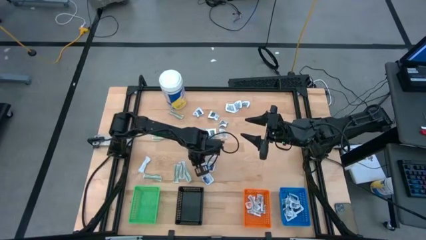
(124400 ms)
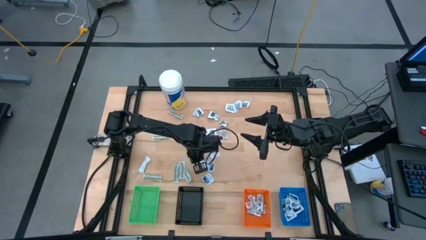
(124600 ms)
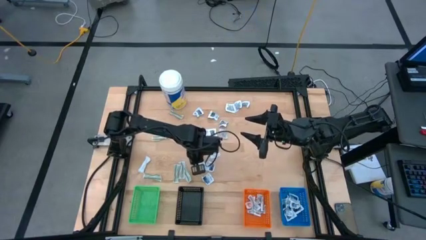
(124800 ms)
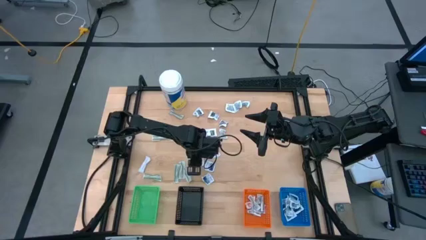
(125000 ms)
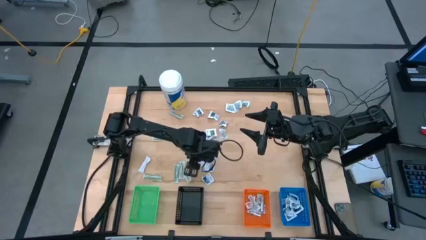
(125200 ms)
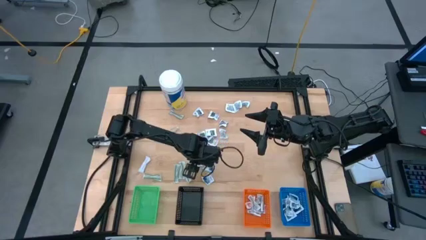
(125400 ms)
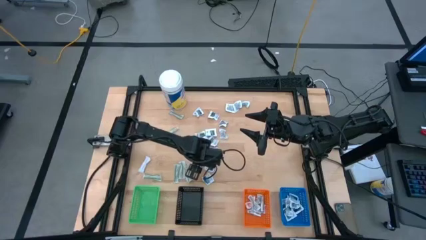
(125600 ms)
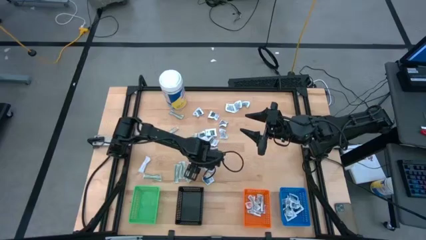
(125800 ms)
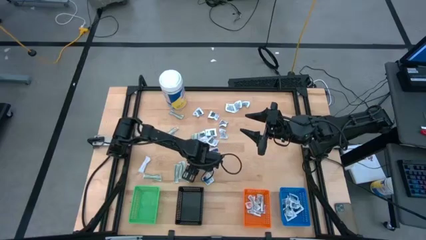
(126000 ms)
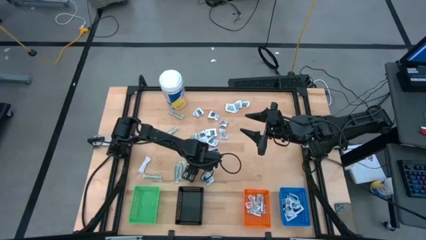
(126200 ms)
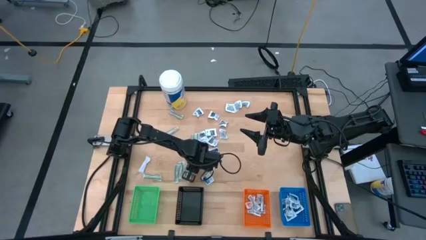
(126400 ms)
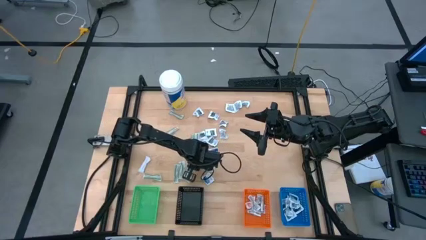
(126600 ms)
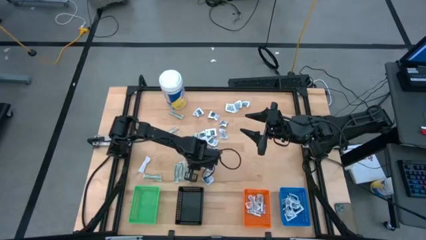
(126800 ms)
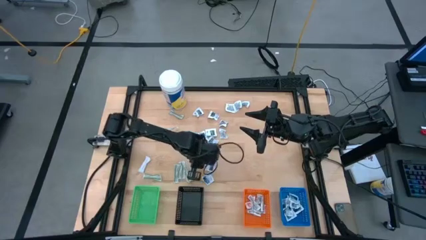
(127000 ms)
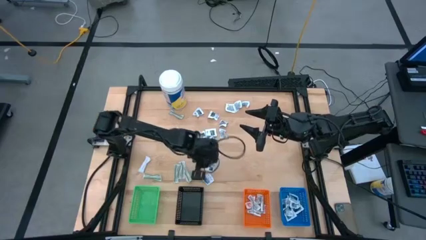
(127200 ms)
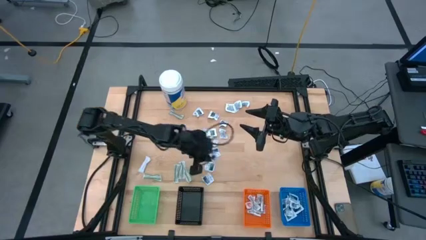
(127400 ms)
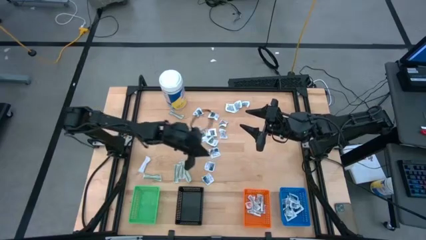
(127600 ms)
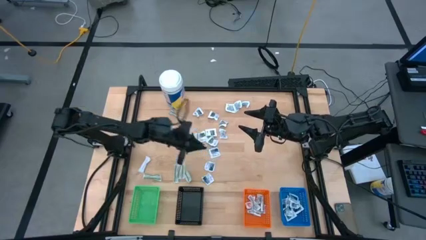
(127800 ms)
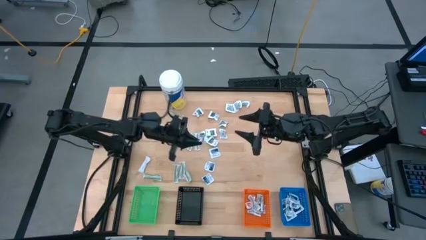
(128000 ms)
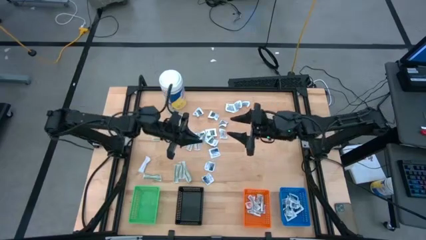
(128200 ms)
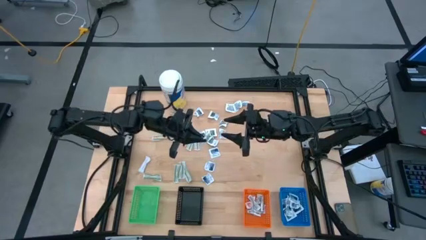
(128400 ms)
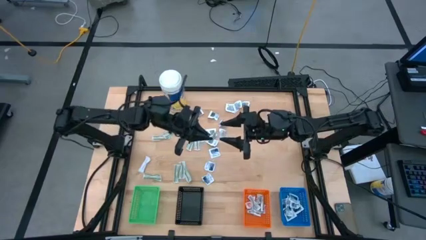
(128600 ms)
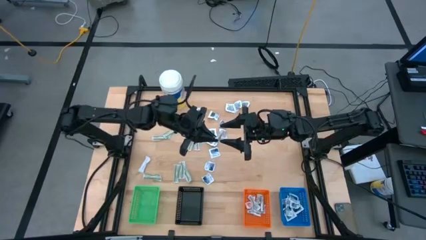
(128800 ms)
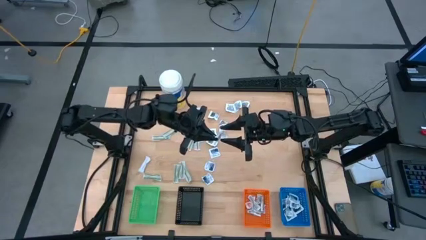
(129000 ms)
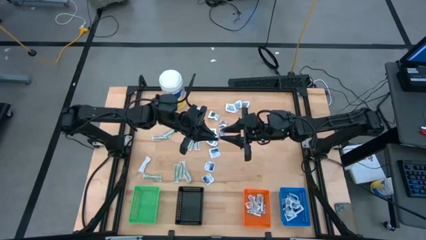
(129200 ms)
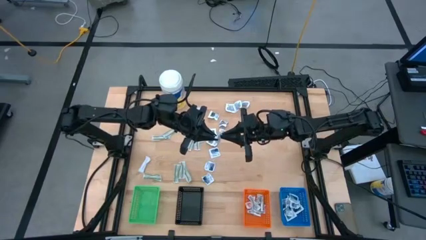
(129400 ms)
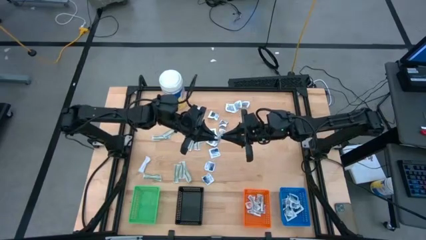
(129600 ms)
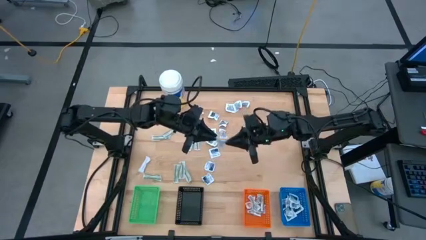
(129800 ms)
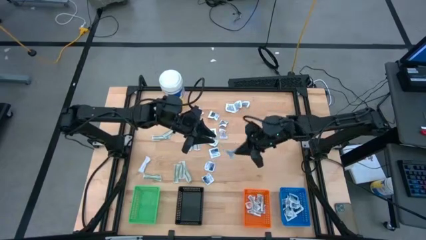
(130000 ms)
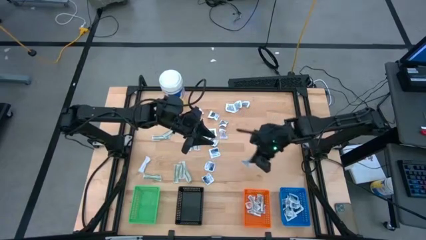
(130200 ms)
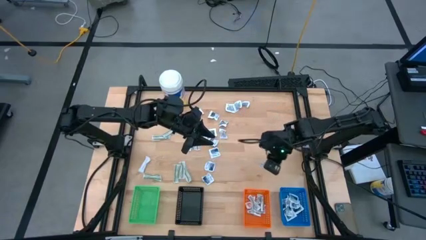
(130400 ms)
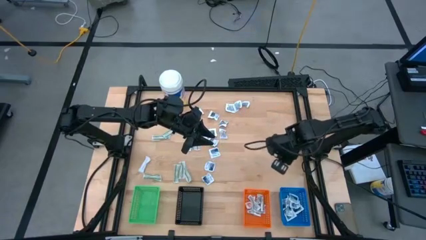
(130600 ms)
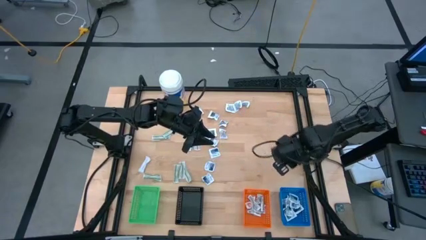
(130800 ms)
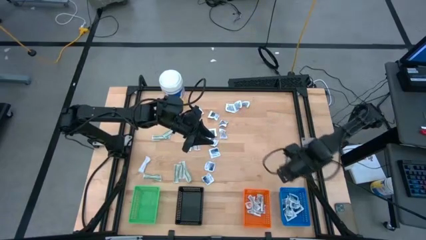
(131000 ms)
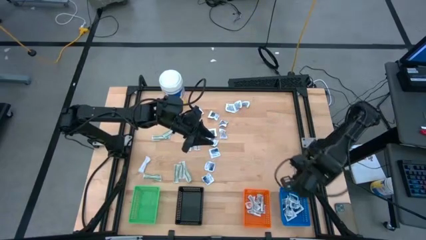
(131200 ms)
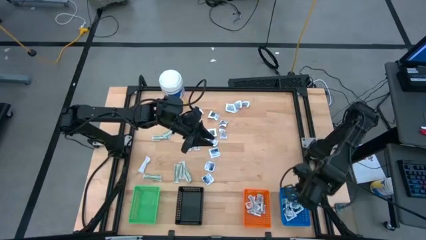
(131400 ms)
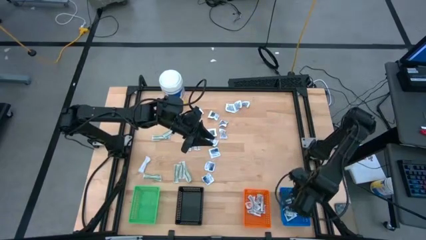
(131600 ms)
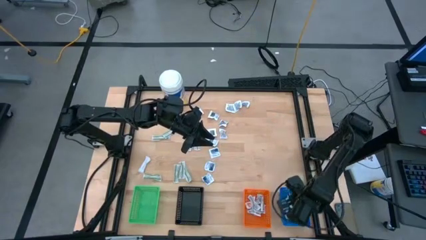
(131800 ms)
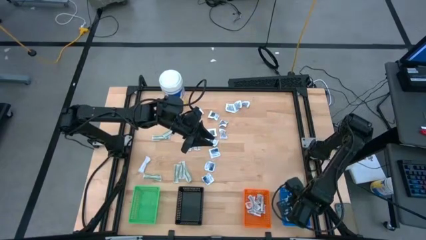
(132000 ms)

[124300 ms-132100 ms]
Task: Pick & Place First Aid Supplies
Put the alcohol pad into the blue bin

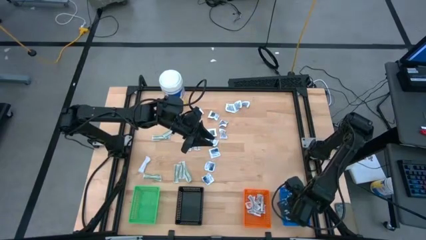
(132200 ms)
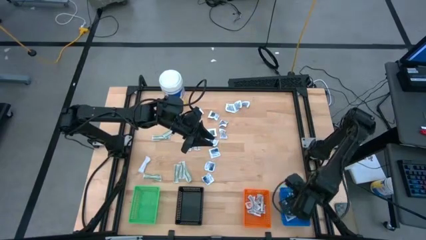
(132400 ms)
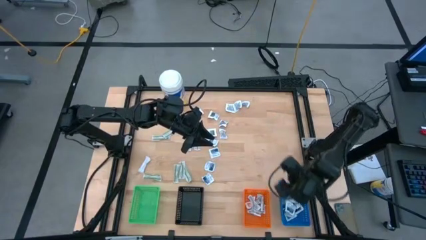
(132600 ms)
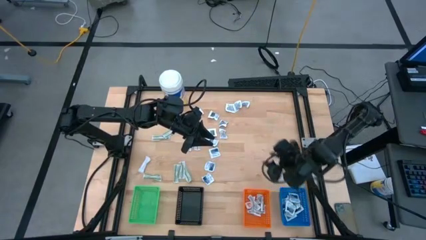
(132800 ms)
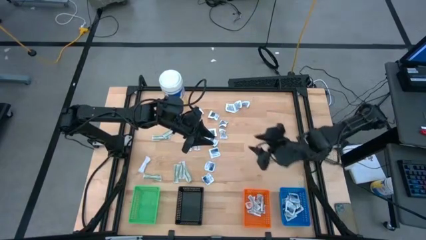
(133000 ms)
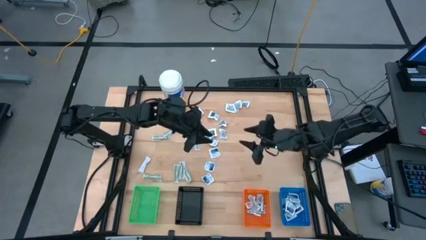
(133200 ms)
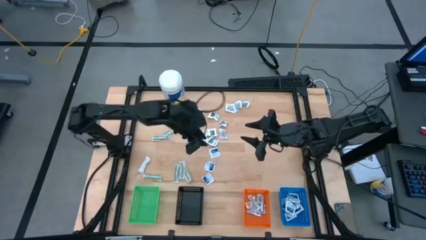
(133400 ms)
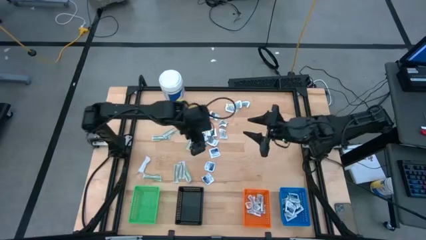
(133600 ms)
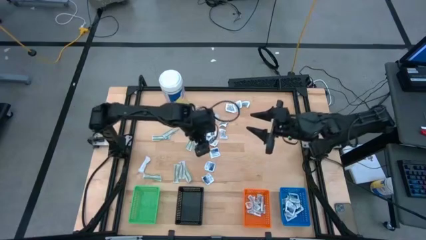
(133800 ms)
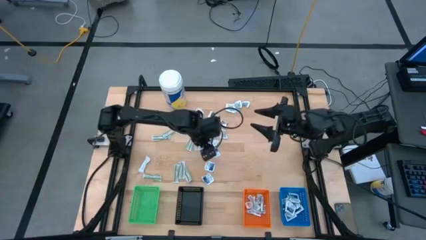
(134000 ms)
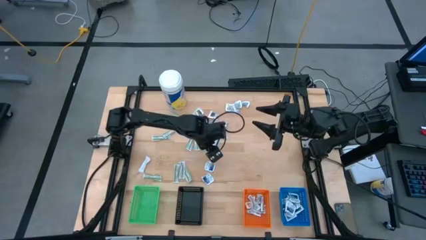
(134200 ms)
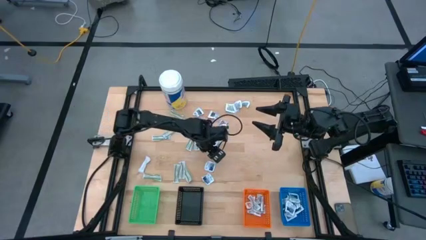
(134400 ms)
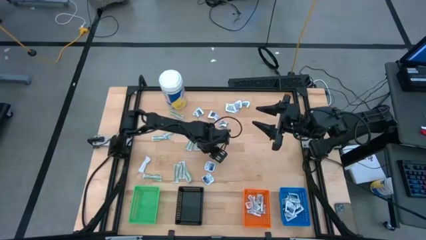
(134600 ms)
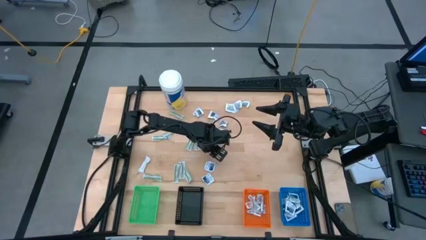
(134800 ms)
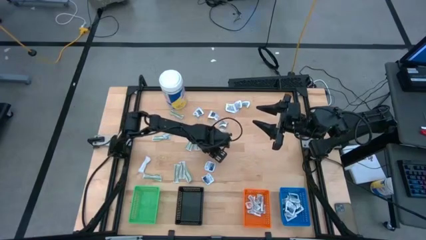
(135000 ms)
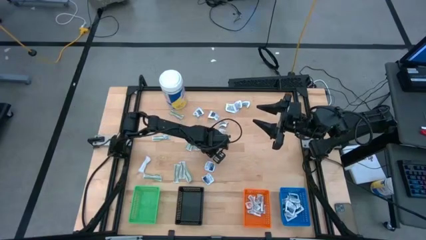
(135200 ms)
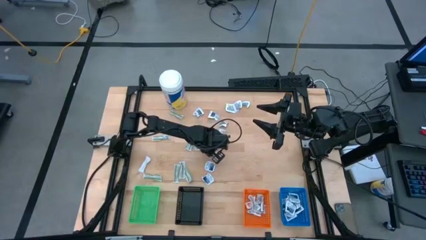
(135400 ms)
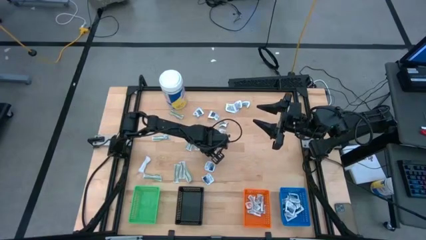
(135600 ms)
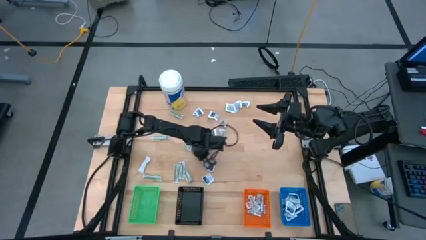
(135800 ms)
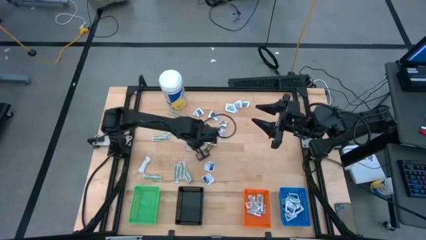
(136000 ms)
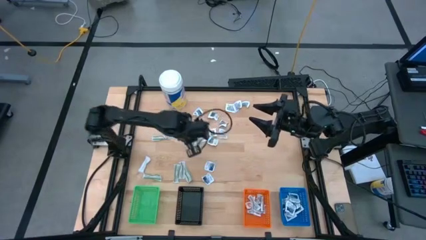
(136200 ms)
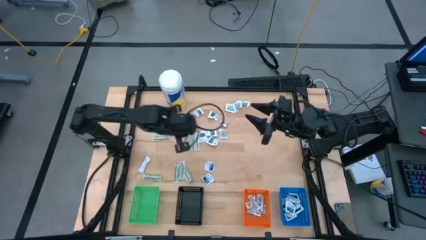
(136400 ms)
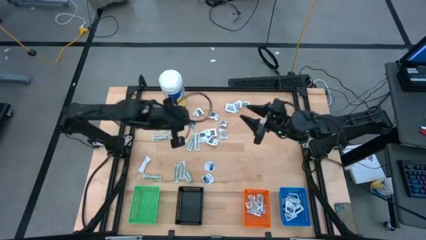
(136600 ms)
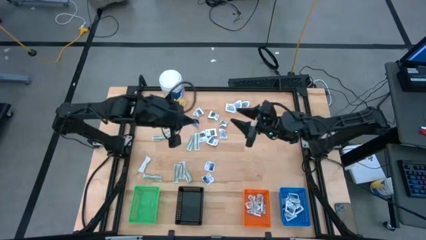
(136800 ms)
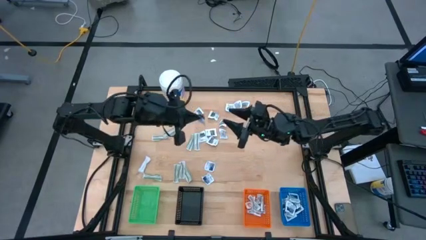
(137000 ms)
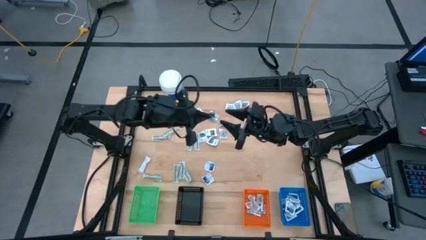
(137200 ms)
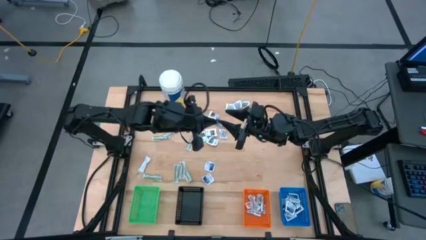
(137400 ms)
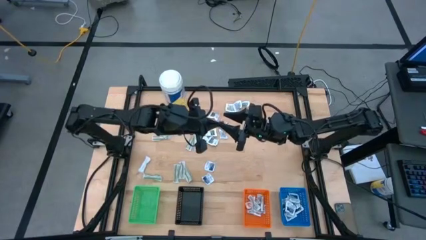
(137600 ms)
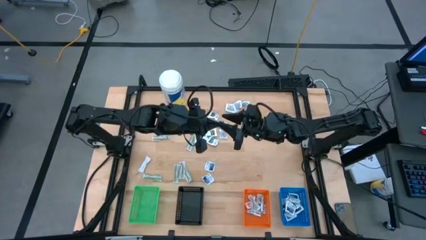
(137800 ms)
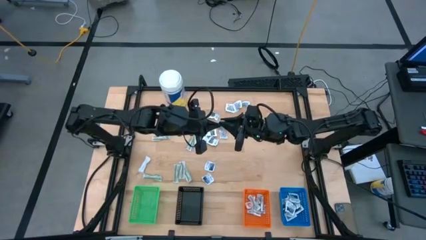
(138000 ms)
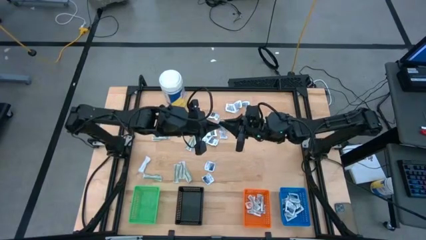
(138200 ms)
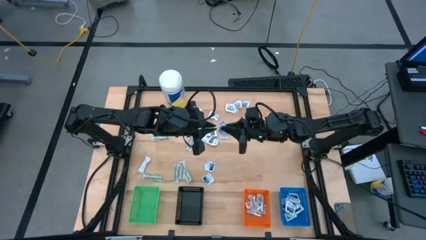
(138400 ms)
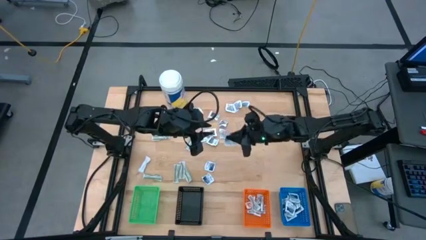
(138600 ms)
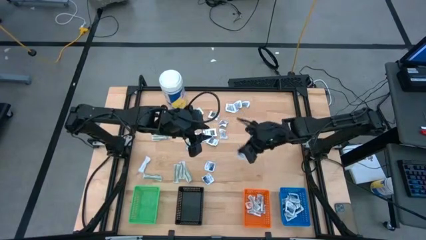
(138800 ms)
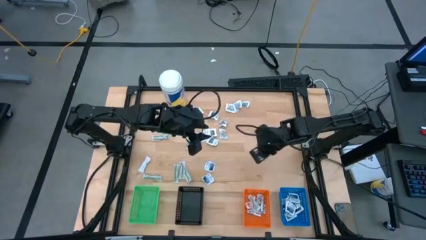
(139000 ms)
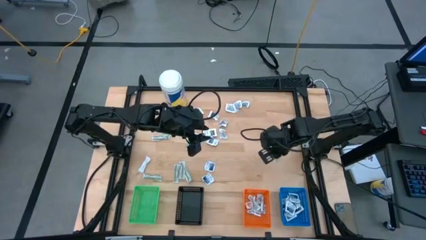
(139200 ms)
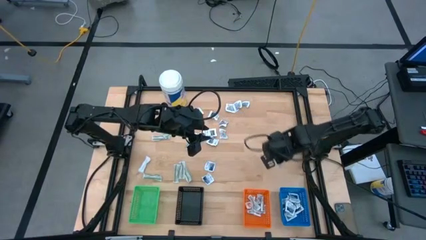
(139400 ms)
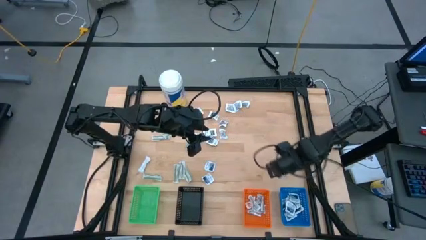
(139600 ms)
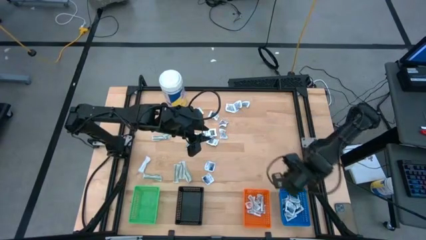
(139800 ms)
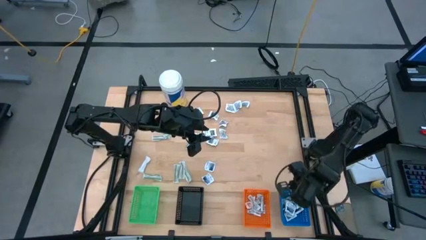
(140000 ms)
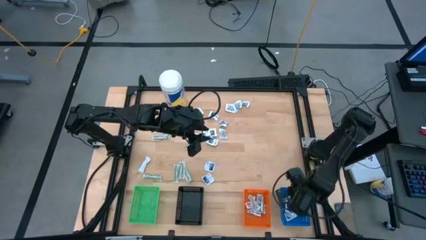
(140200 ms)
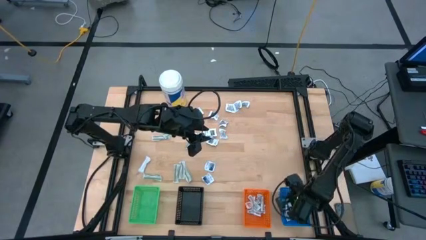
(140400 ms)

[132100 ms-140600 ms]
Put the alcohol pad into the blue bin

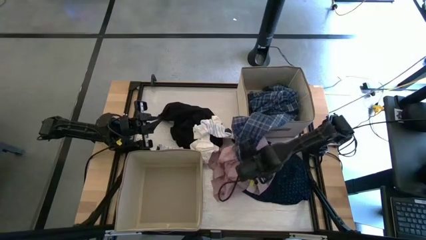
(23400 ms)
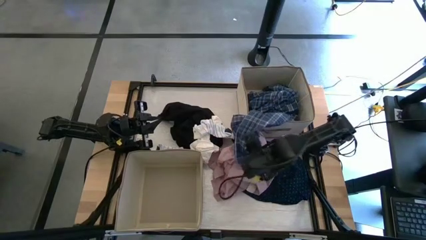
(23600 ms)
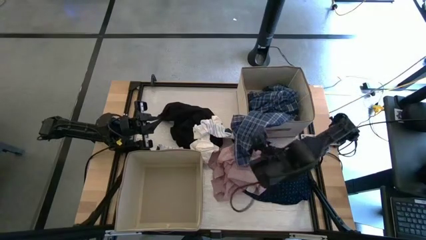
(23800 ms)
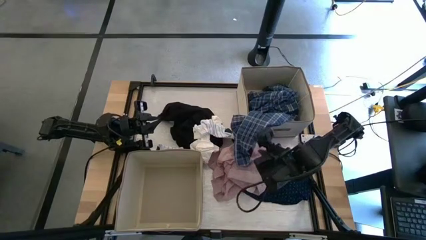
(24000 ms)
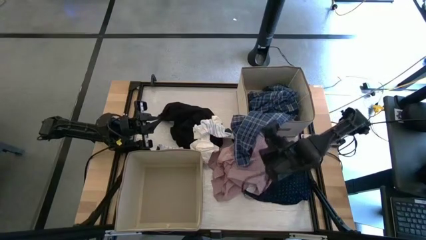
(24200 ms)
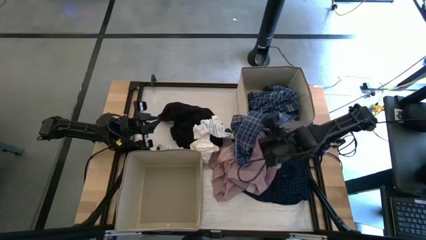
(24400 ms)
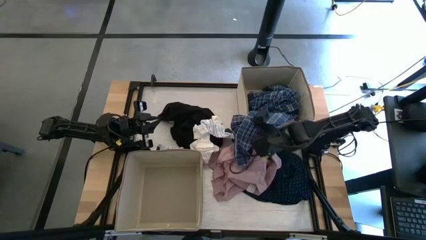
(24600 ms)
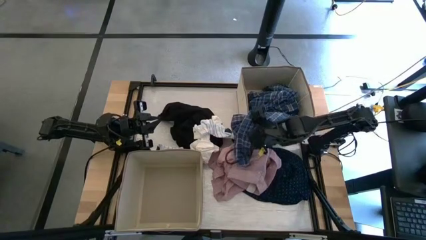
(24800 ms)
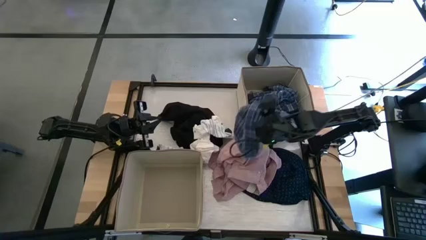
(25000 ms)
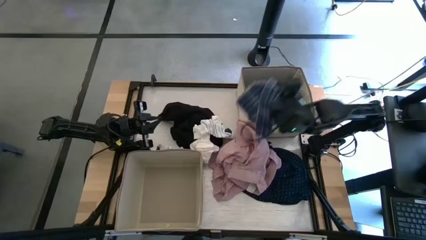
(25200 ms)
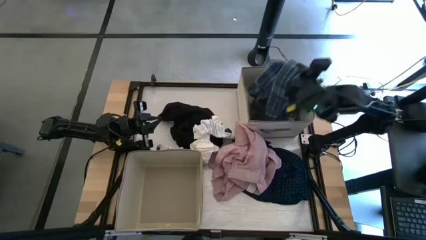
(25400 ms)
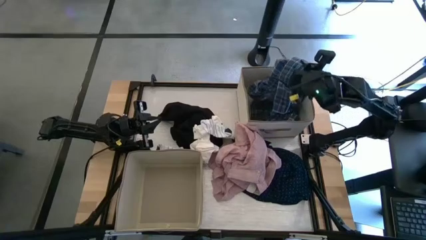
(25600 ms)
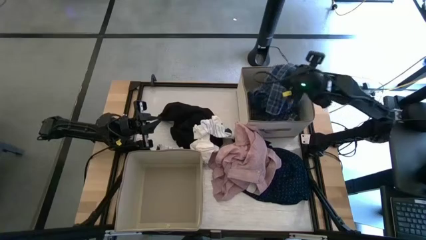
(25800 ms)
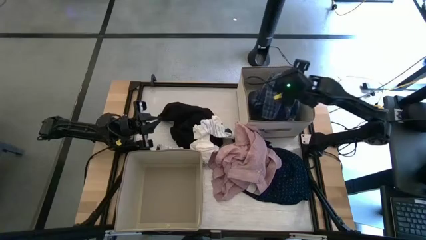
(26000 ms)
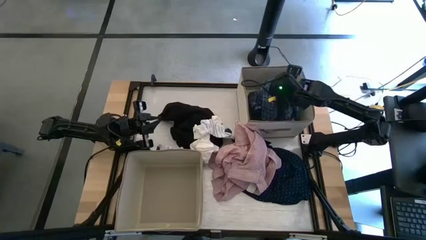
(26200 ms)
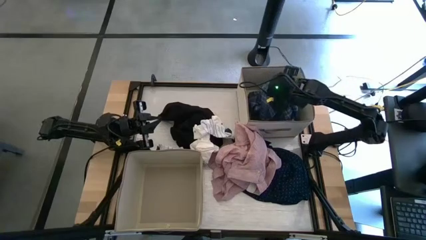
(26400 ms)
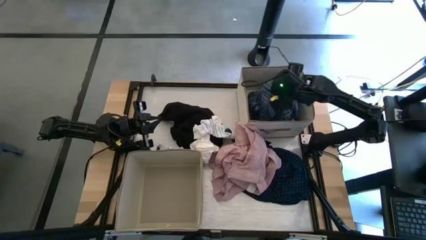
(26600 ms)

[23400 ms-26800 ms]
Task: Sort clothes
Put the blue checkered polo shirt into the right laundry organizer
